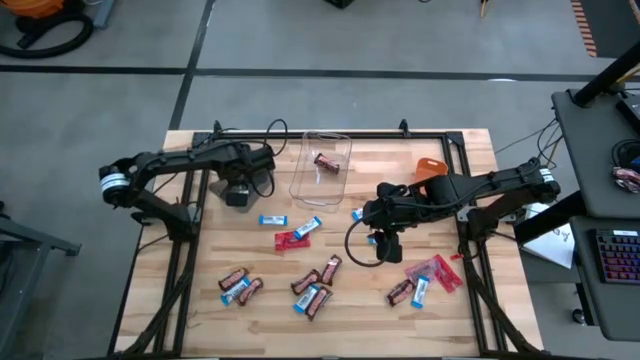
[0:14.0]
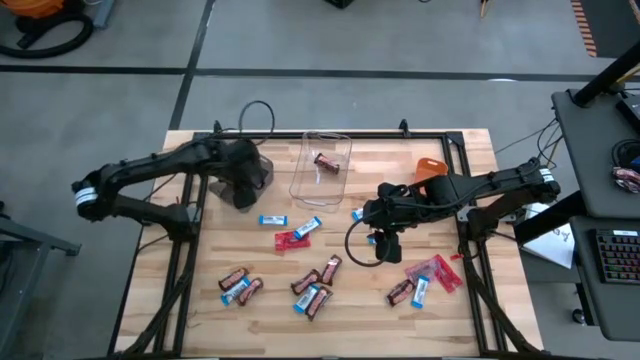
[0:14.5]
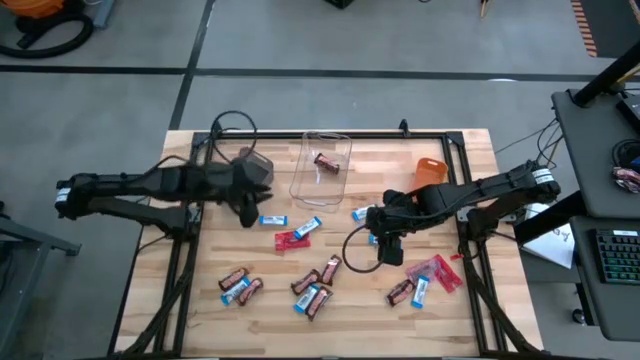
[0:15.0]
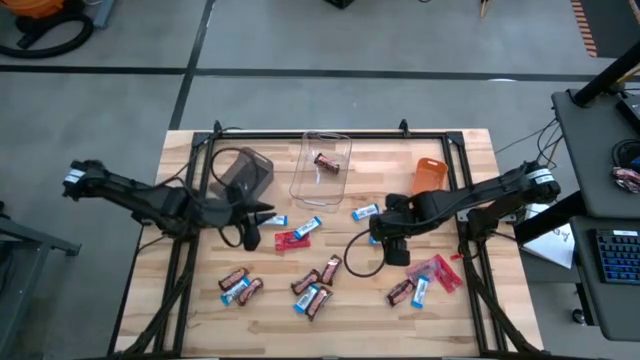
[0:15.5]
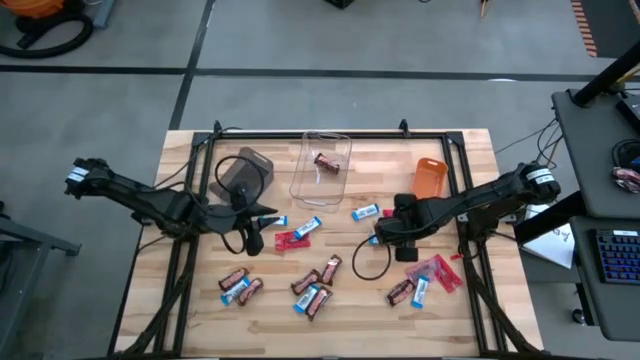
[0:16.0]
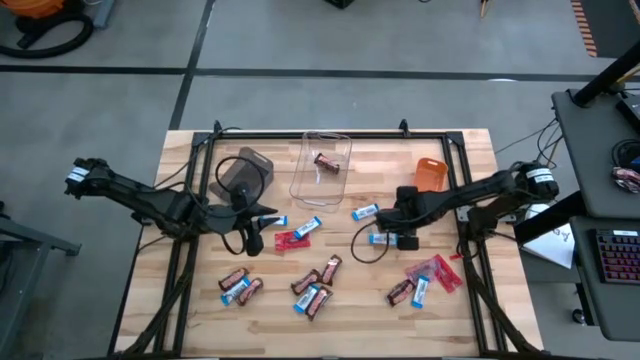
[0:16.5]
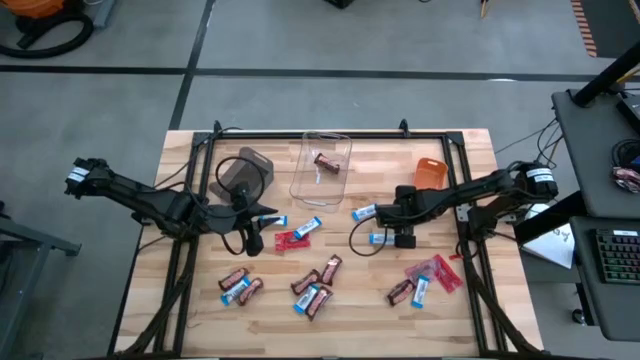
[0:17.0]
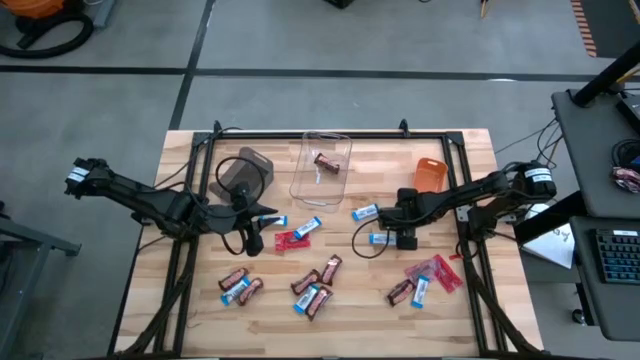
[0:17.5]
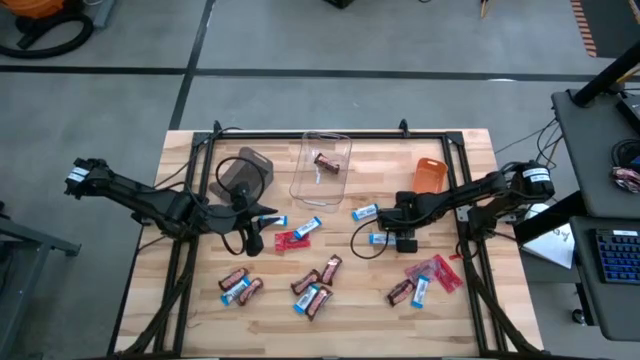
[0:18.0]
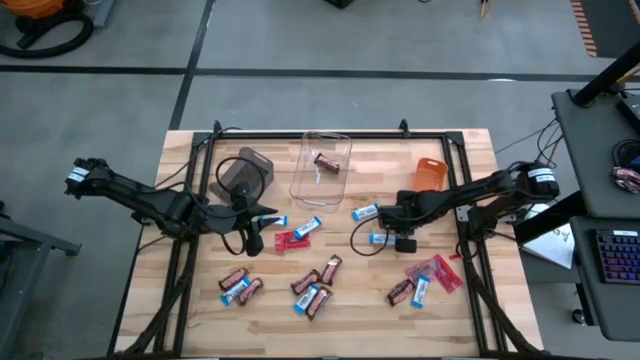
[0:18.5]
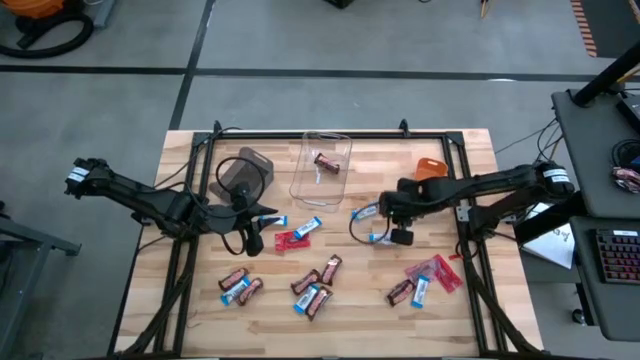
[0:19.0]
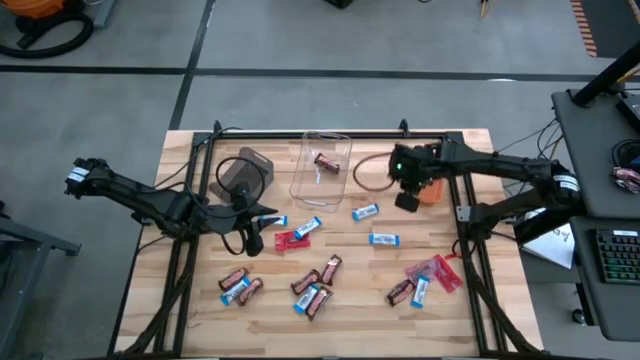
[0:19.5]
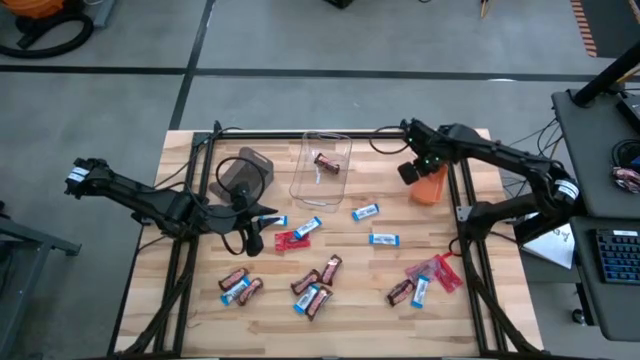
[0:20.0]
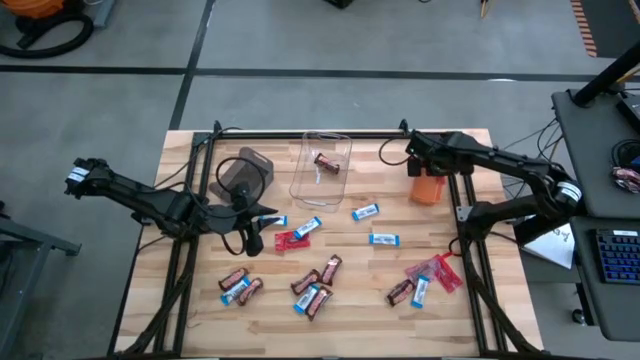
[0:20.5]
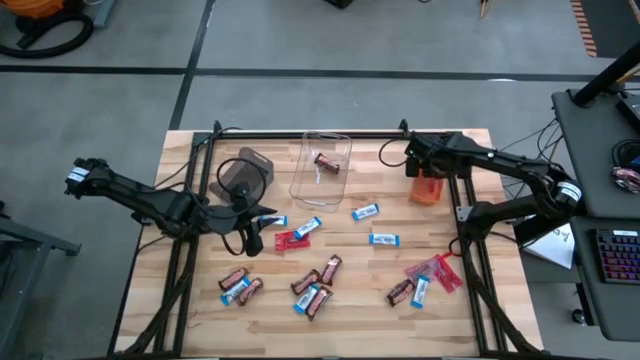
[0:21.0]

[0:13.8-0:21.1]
Task: Sort candy
Put the red candy into the orange bin

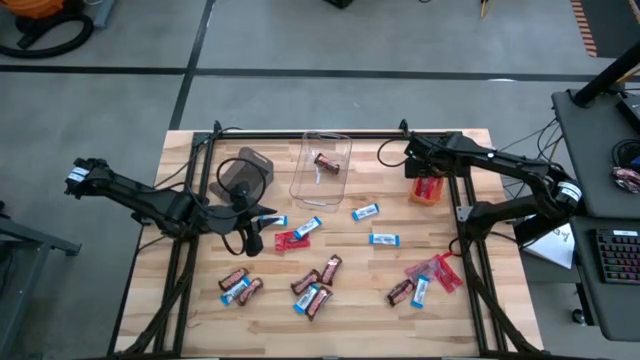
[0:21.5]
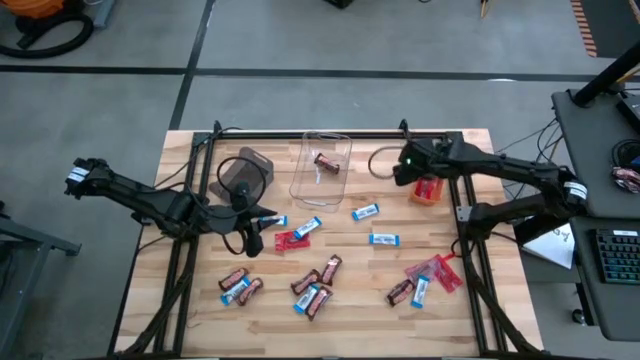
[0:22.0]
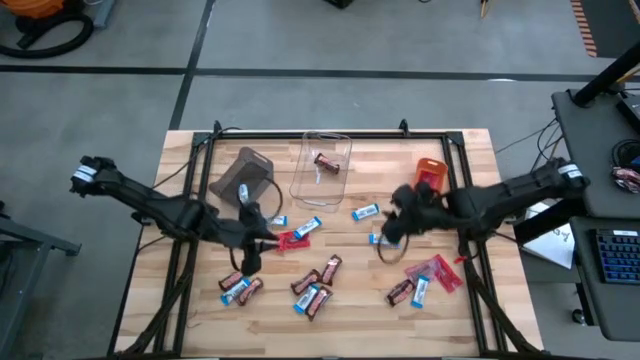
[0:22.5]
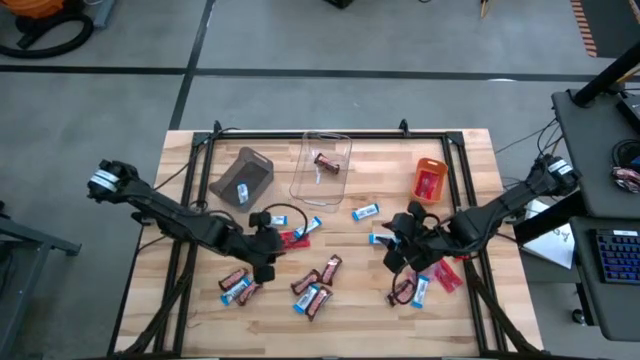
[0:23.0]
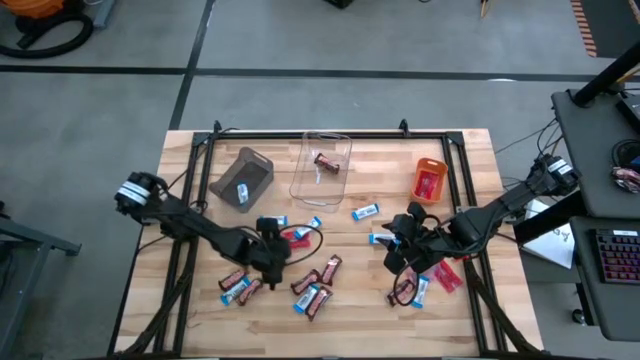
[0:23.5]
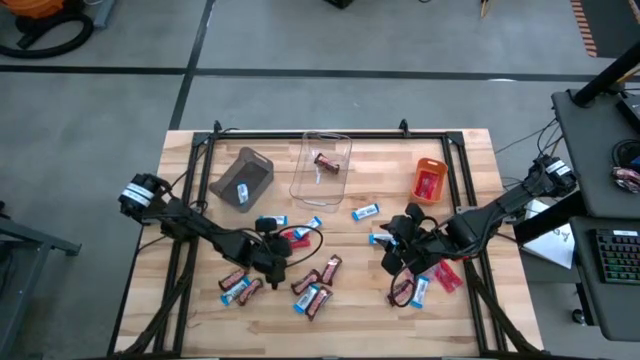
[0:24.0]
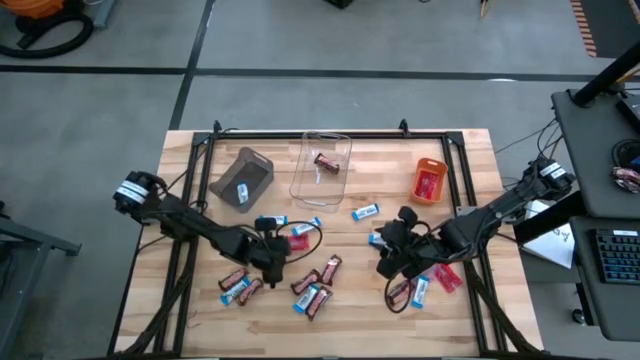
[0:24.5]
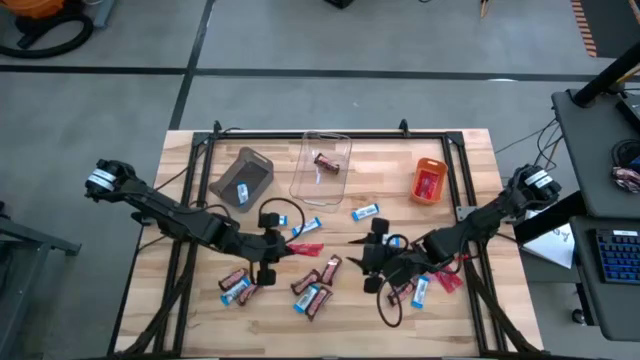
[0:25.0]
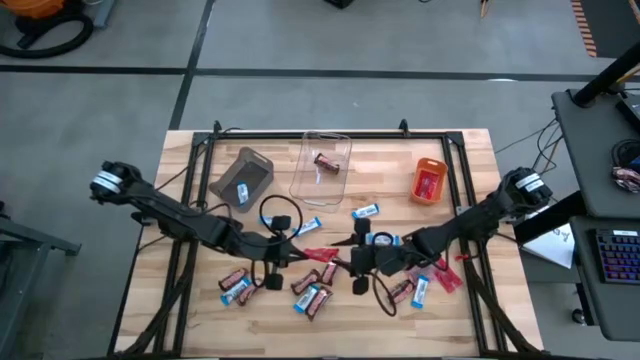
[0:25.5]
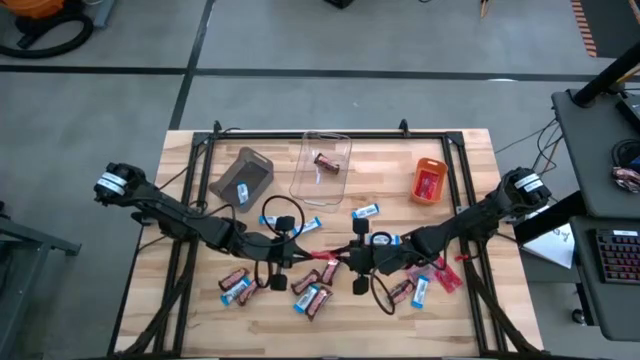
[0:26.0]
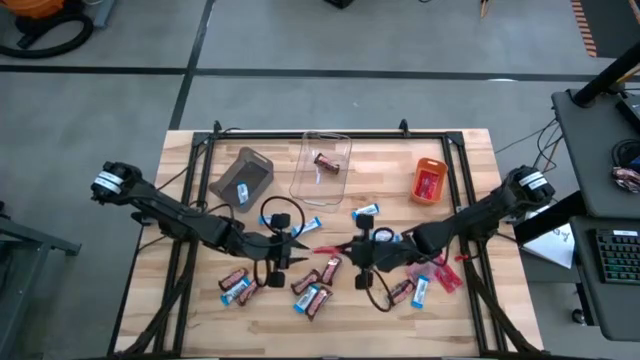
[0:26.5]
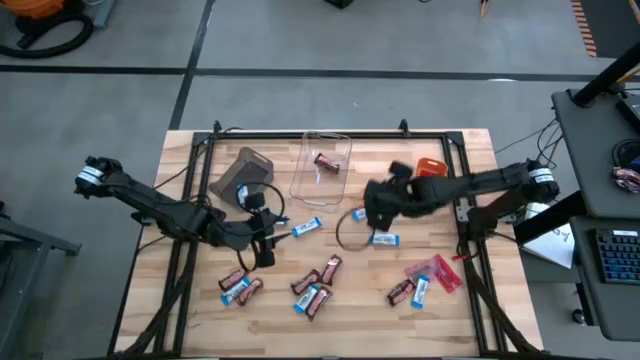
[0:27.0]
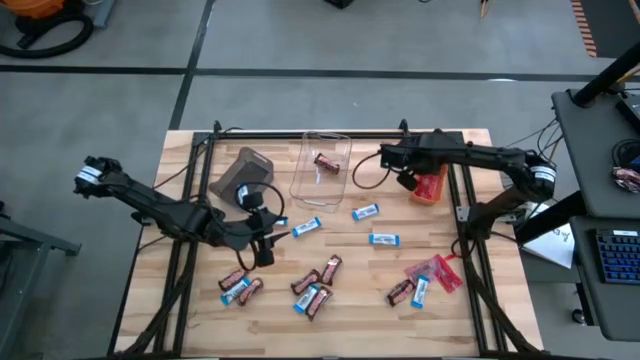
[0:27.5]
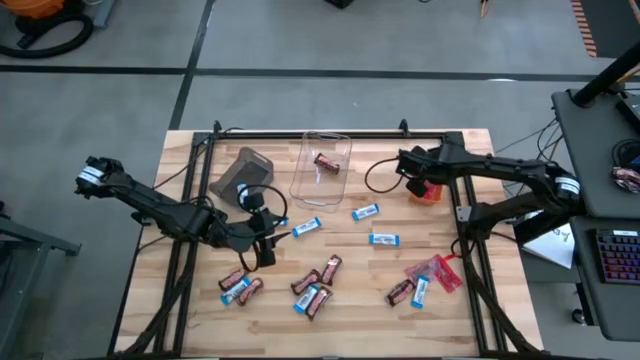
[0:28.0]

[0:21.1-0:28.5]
Put the red candy into the orange bin

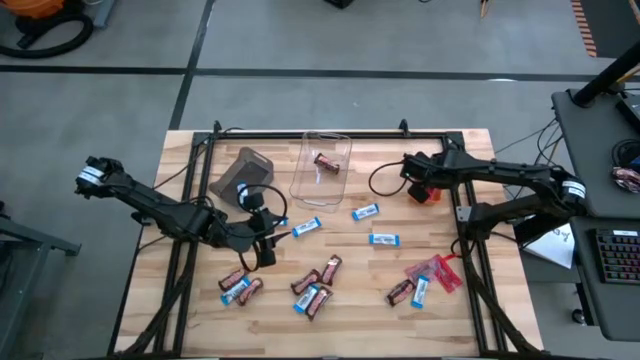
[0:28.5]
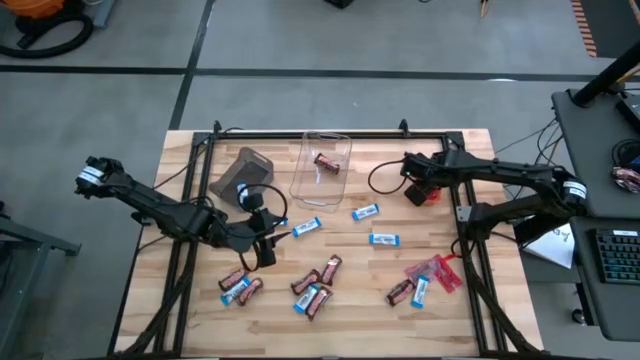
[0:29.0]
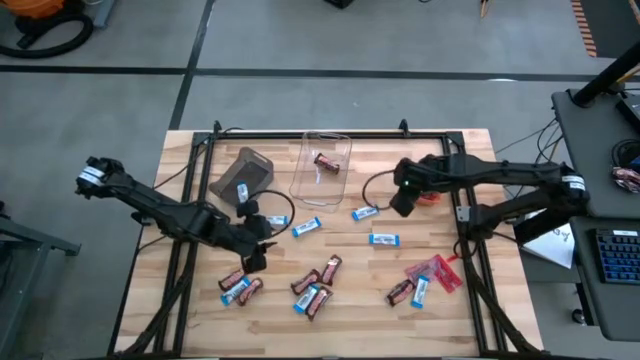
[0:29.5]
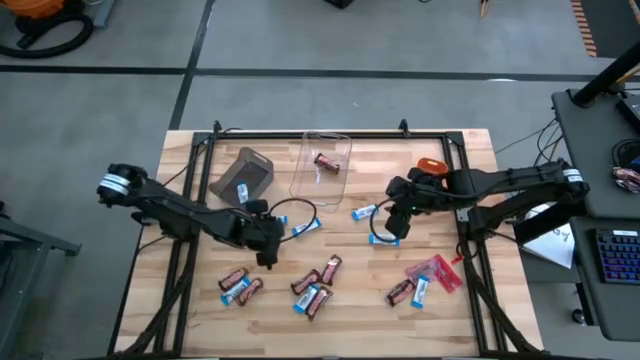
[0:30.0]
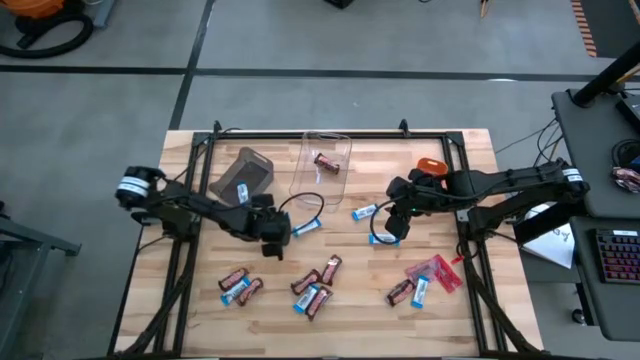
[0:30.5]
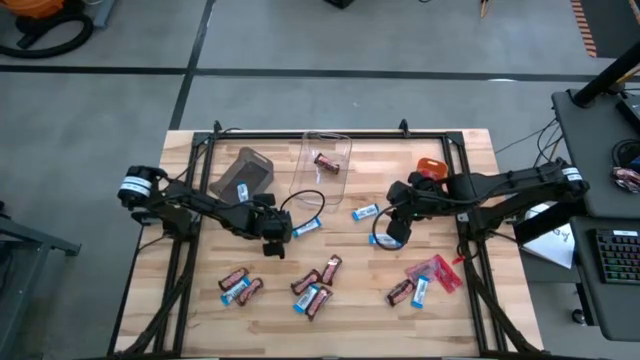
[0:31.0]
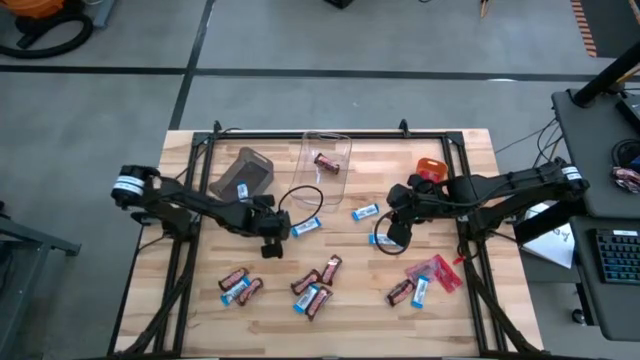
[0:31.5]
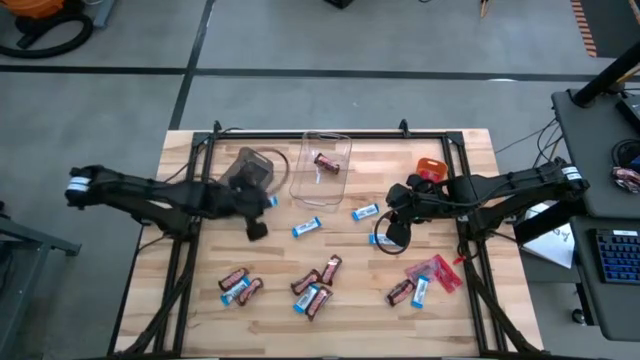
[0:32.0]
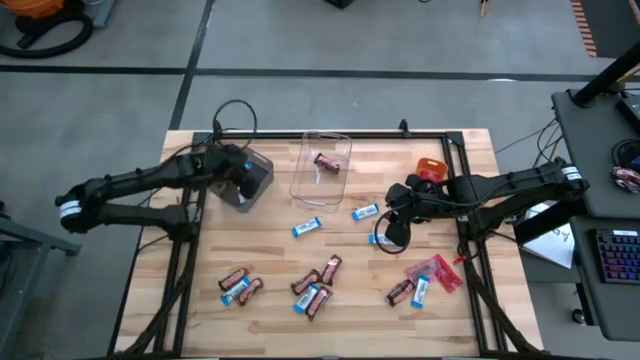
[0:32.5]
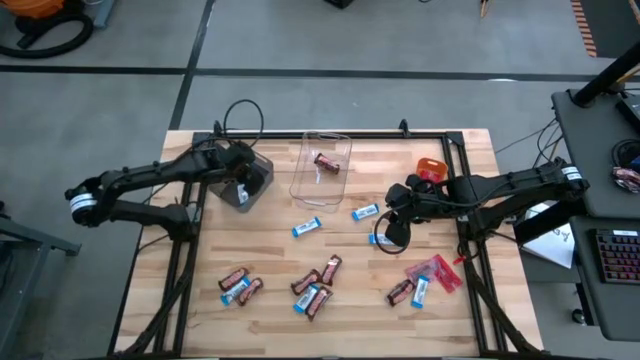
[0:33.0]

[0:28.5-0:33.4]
Put the blue chocolate into the black bin

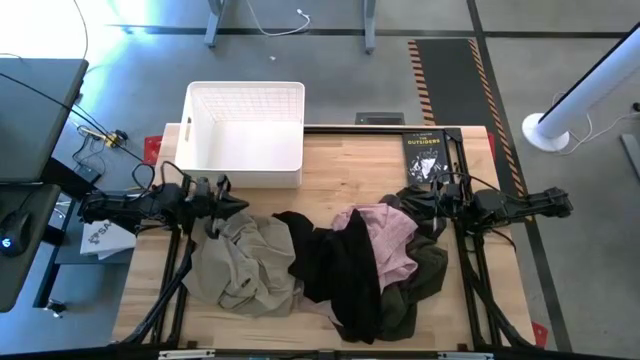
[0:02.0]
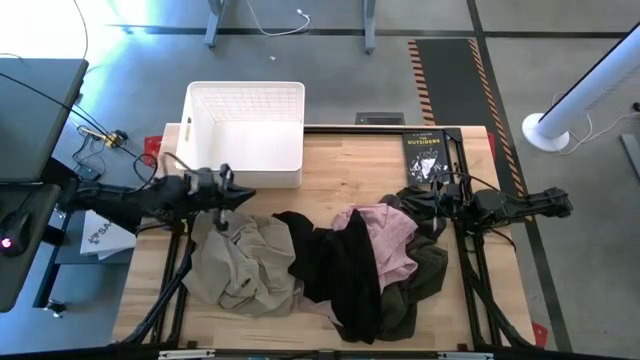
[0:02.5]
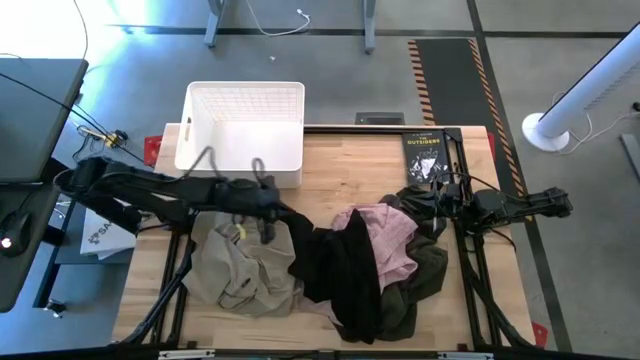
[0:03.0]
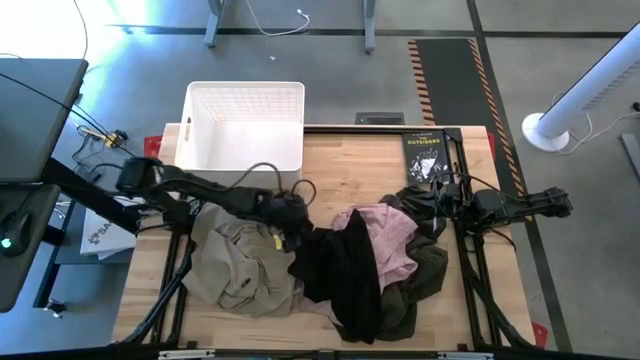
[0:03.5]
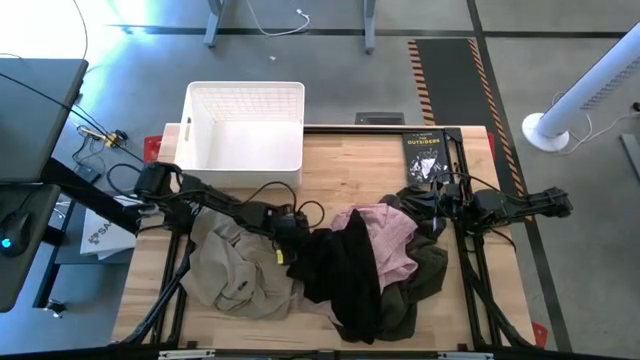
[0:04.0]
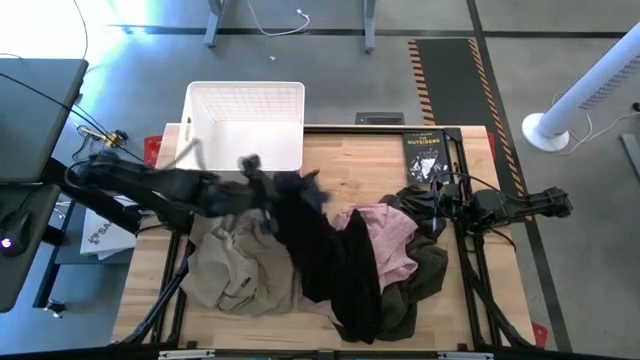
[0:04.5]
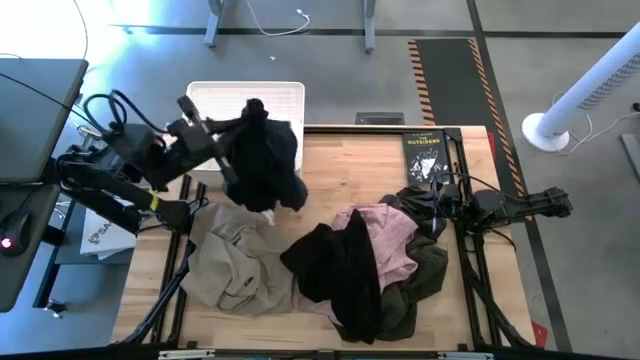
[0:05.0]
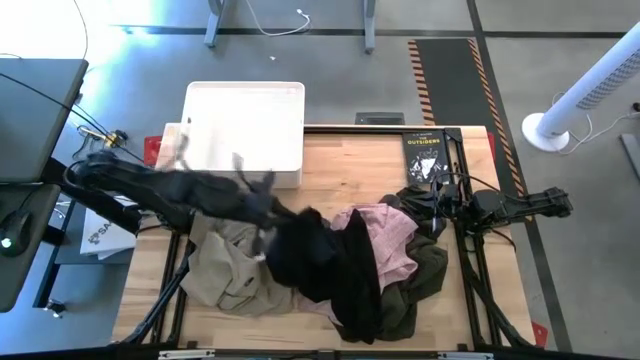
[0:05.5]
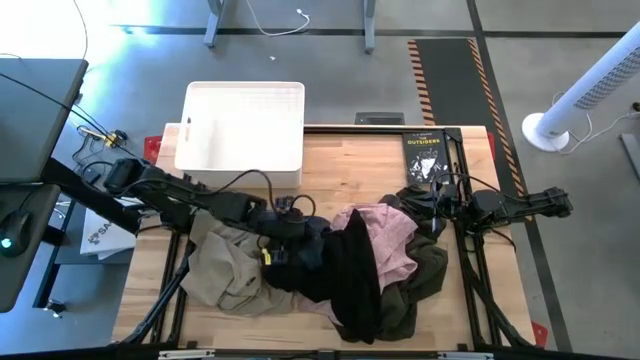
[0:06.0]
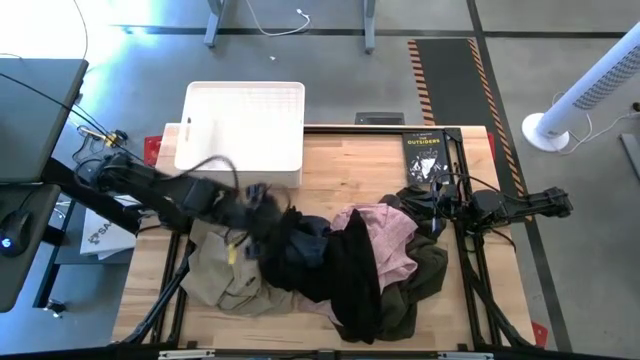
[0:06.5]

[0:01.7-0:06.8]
Task: Sort clothes
Put the black short into the laundry bin
